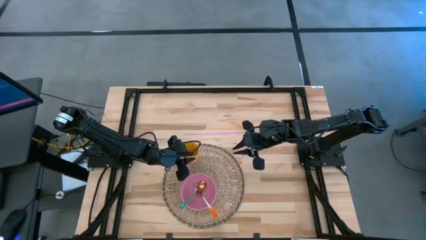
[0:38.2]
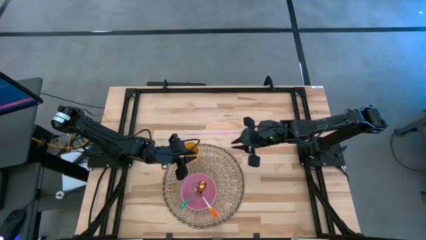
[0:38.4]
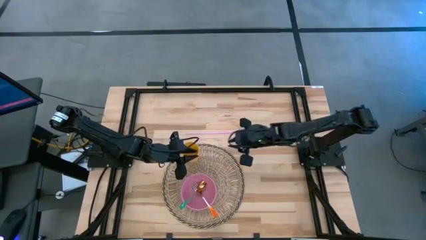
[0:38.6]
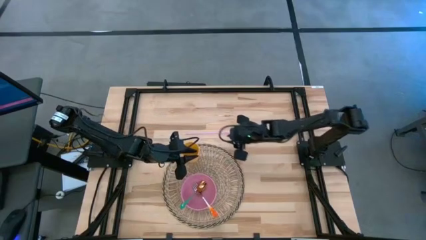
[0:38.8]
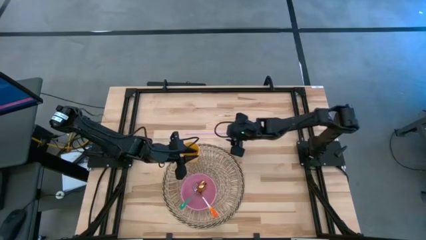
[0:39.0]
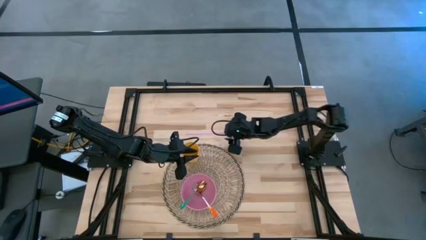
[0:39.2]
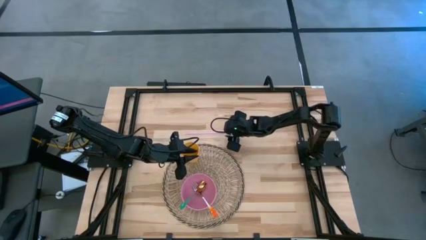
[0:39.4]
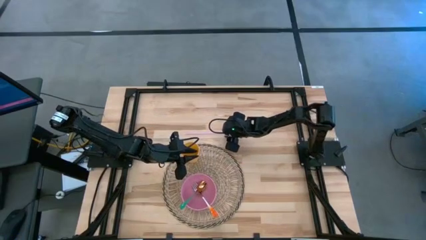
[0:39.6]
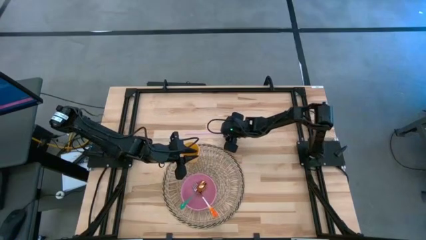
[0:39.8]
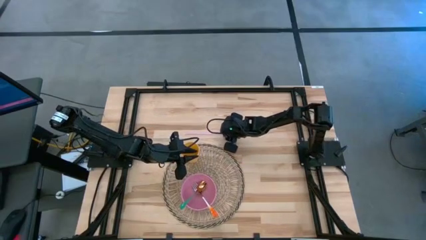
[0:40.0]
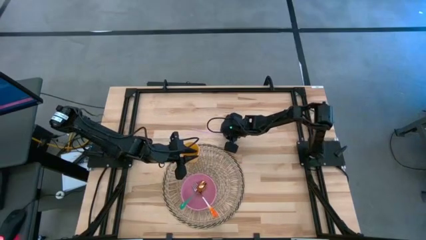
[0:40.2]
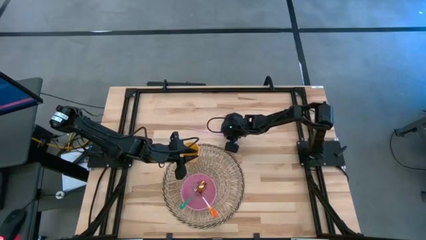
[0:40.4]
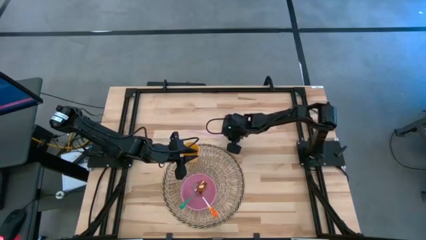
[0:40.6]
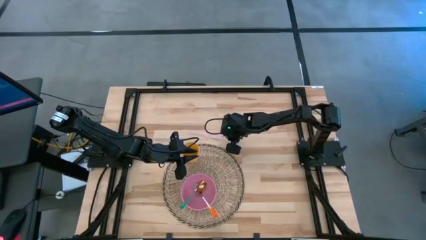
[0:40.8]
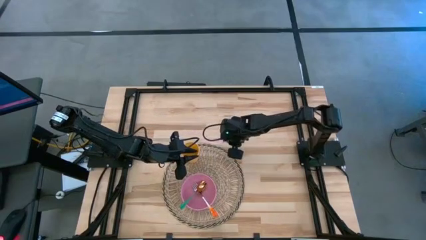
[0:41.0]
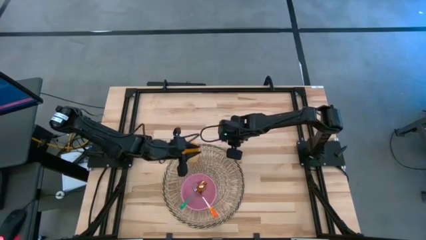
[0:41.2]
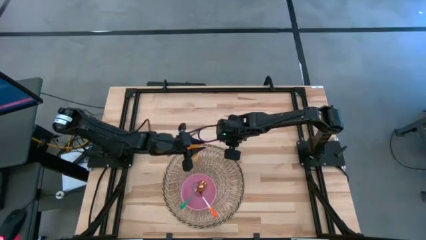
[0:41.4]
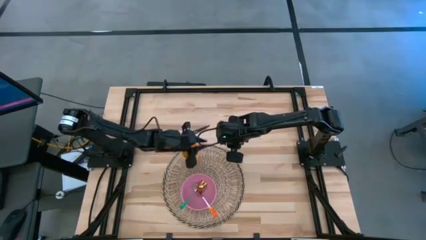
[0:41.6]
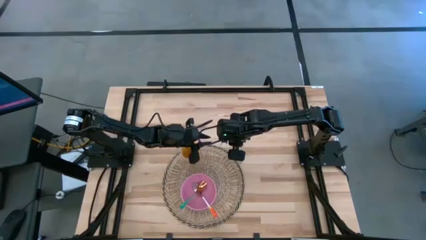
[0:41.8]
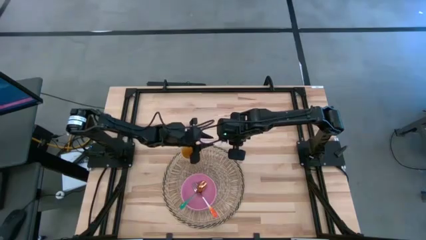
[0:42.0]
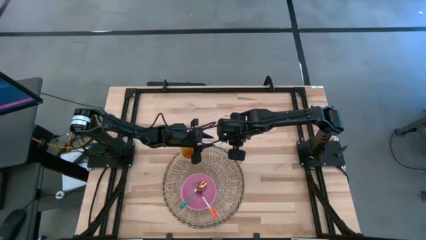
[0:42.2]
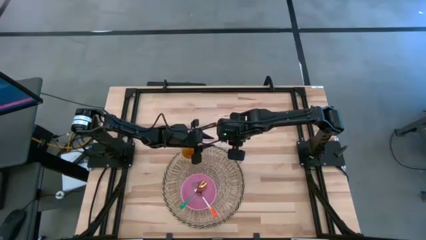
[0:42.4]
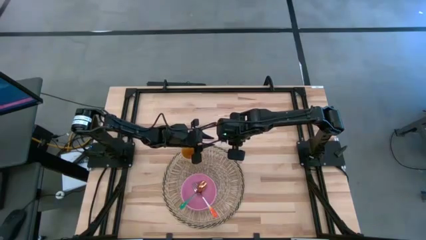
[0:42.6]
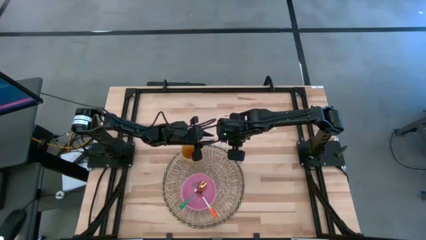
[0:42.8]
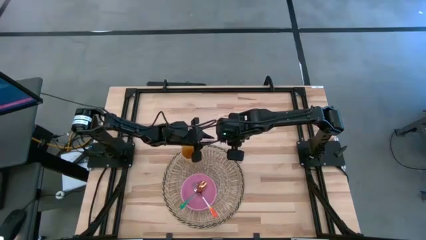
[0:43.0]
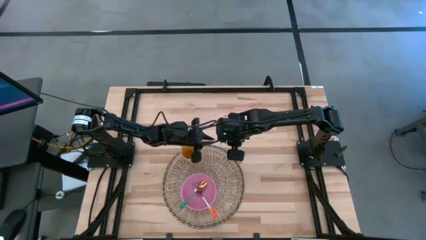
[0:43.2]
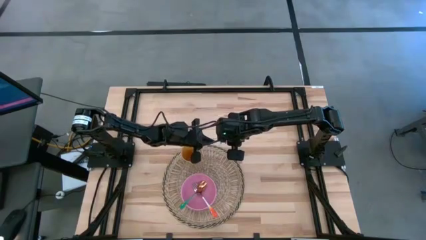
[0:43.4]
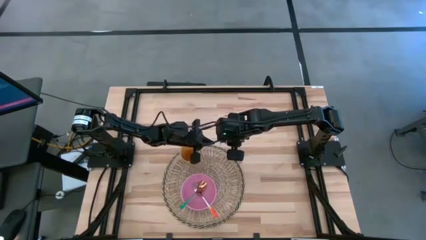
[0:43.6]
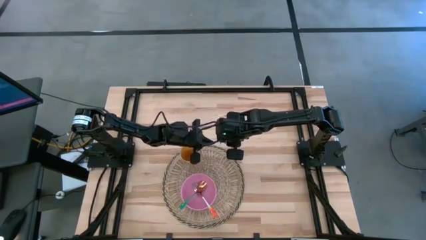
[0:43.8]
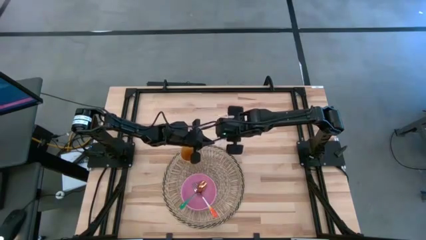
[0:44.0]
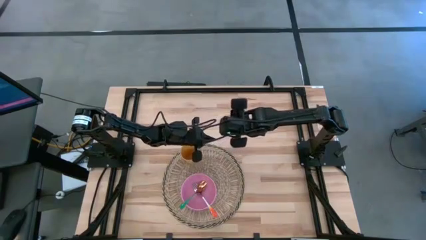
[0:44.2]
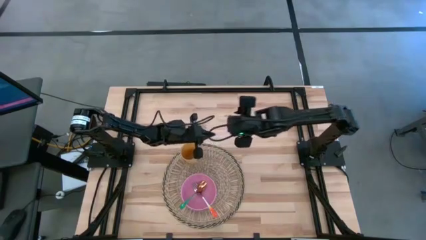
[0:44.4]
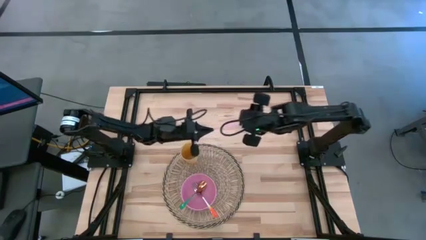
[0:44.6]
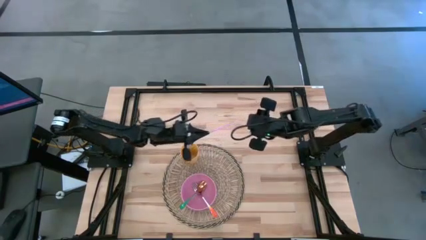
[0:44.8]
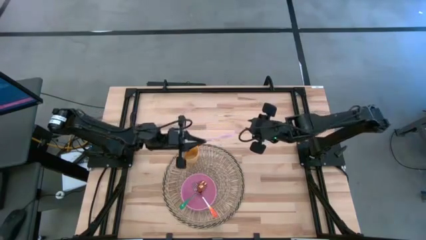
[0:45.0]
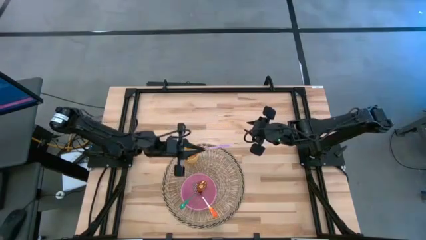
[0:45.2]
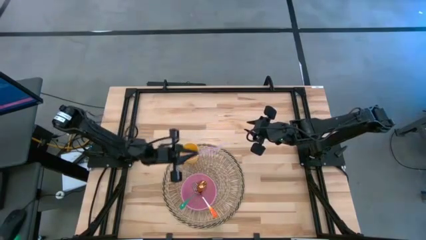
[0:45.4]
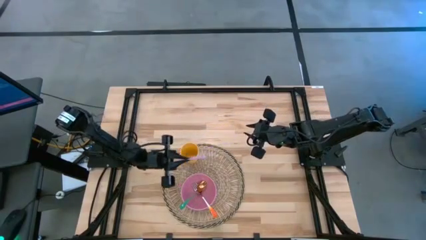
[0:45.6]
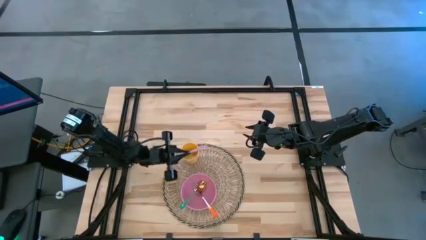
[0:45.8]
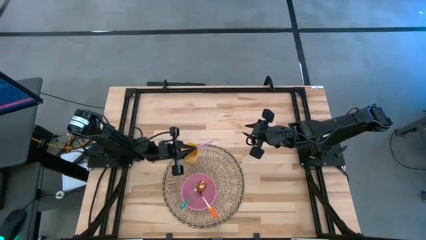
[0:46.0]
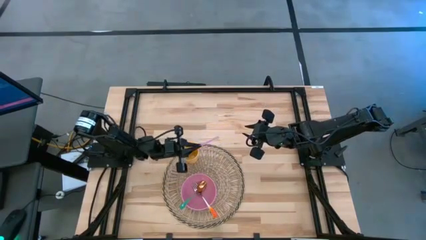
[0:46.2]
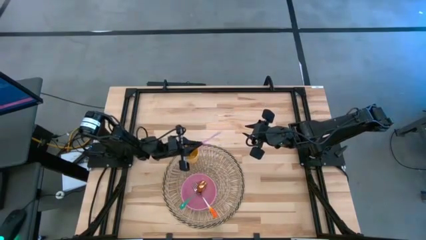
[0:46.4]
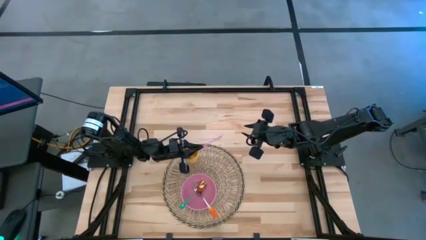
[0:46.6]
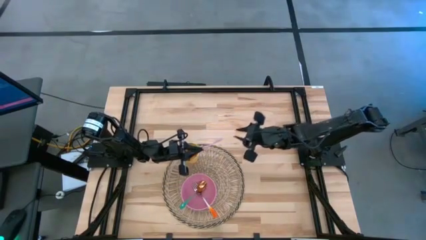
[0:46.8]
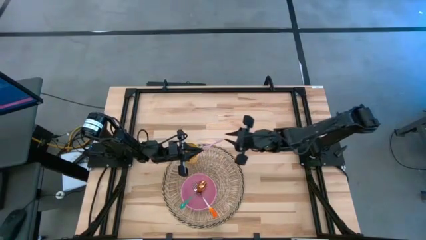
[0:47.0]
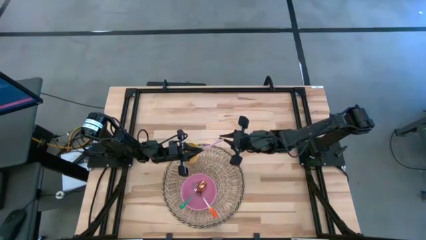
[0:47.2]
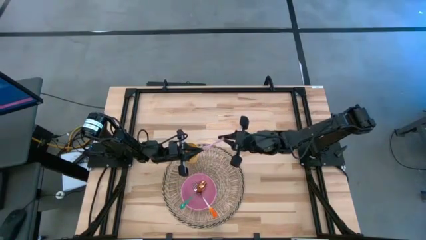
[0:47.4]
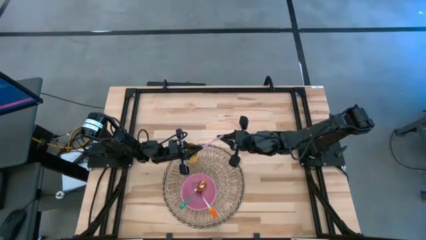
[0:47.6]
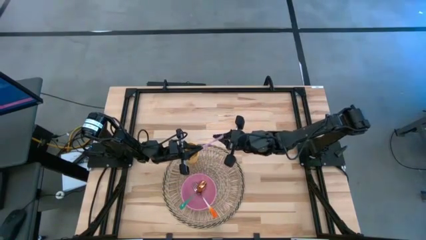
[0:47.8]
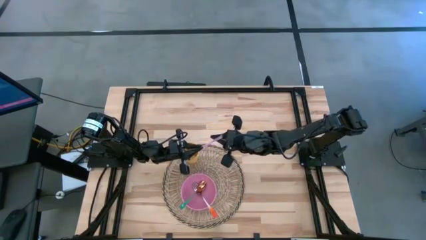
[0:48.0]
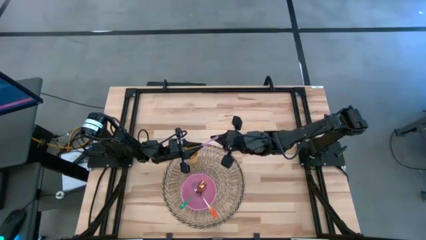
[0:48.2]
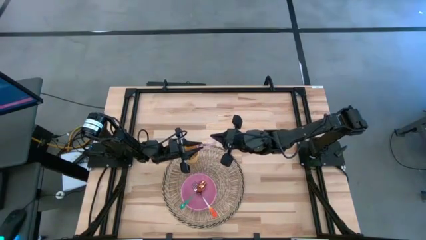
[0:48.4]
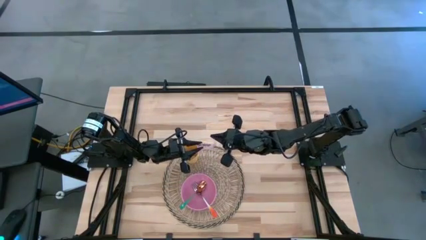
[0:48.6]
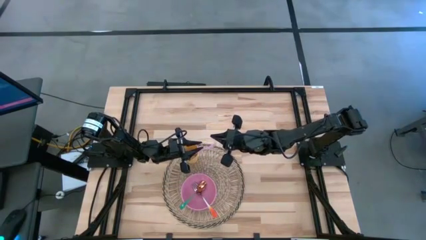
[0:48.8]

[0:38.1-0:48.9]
Task: Pick & Place Utensil
Put the pink straw into the yellow cup
